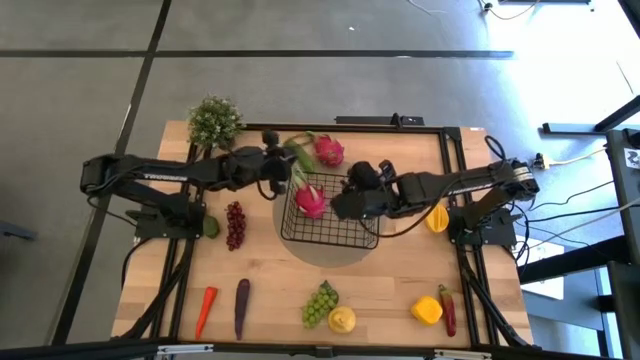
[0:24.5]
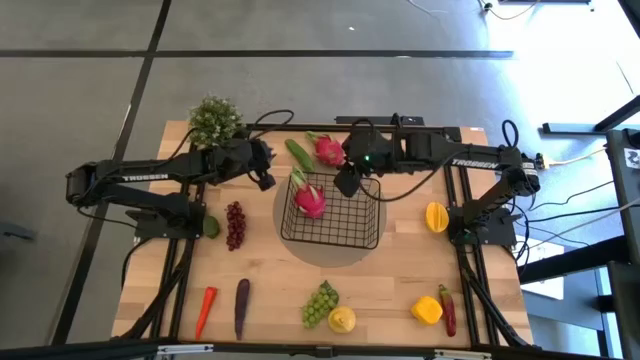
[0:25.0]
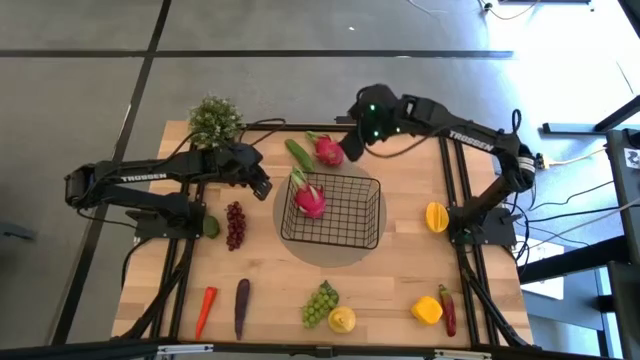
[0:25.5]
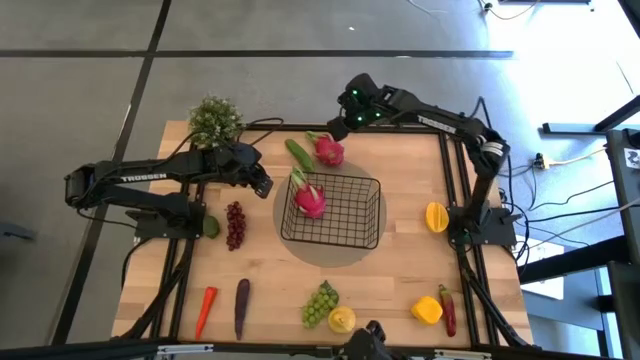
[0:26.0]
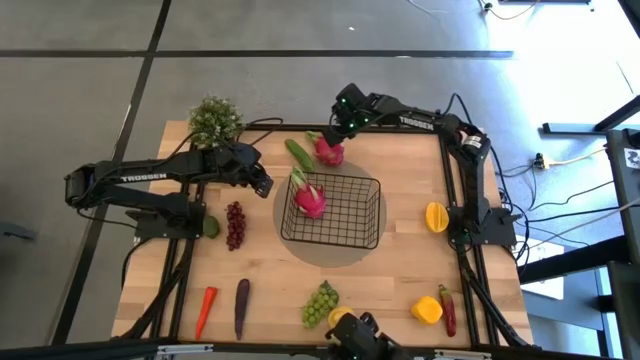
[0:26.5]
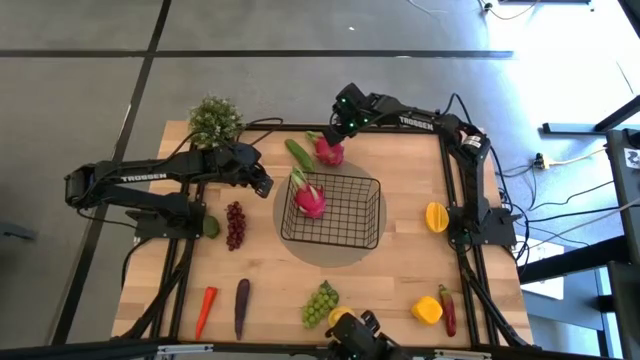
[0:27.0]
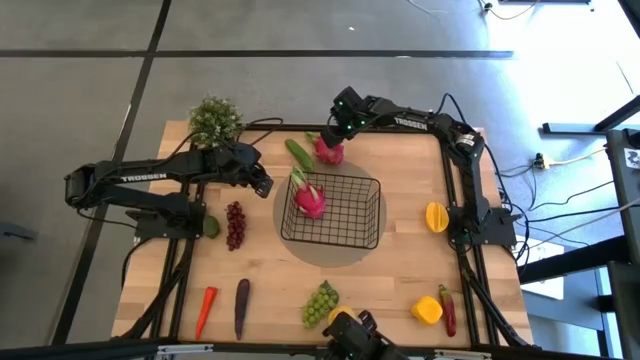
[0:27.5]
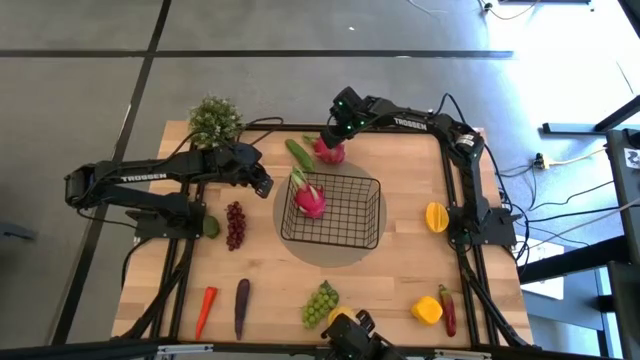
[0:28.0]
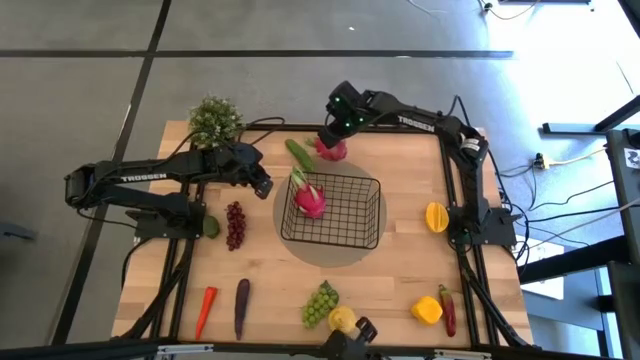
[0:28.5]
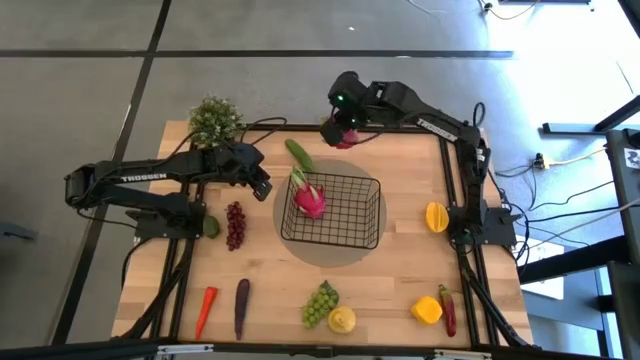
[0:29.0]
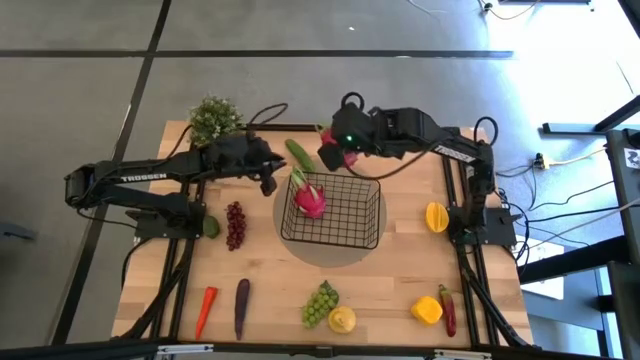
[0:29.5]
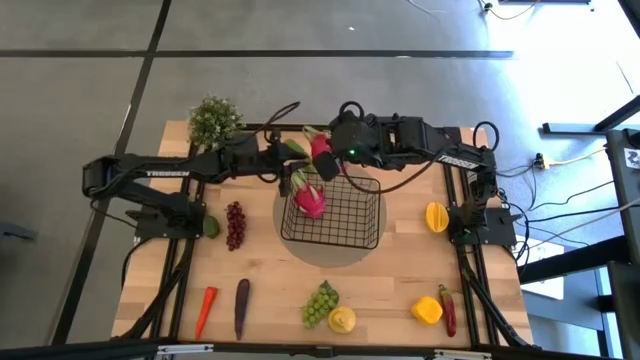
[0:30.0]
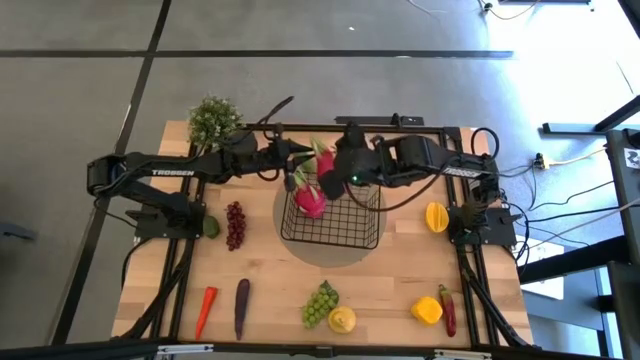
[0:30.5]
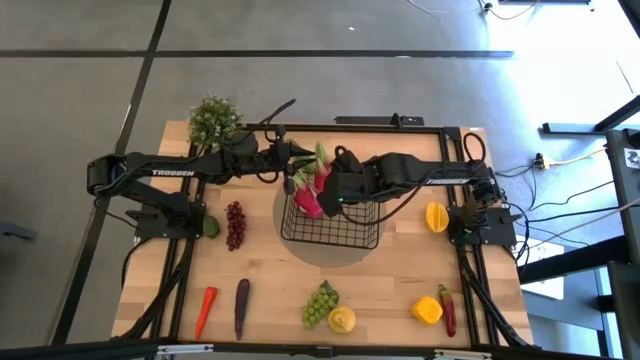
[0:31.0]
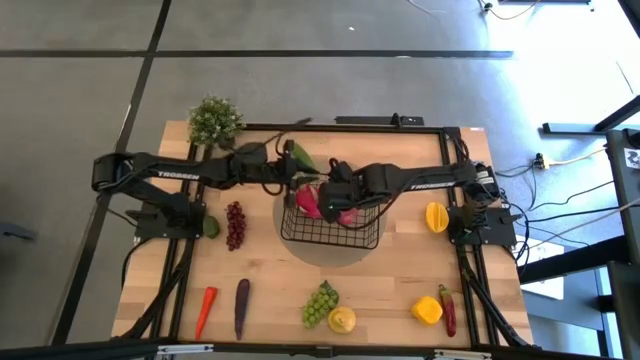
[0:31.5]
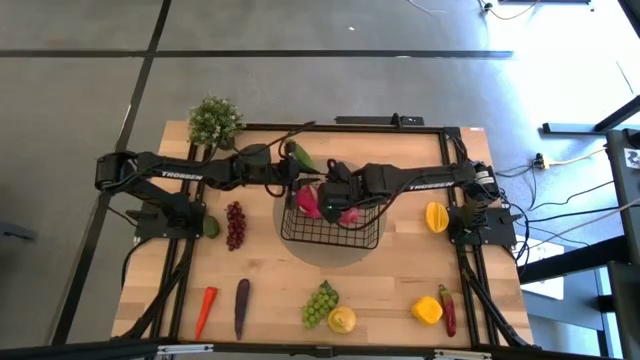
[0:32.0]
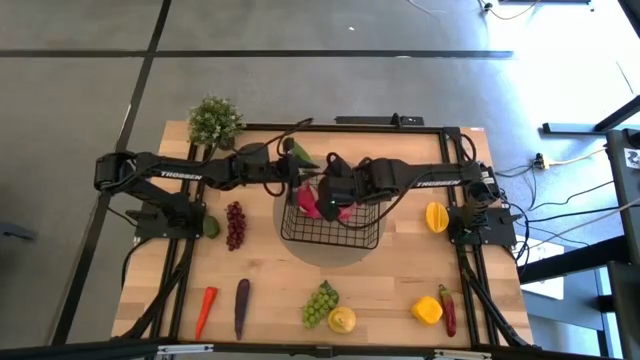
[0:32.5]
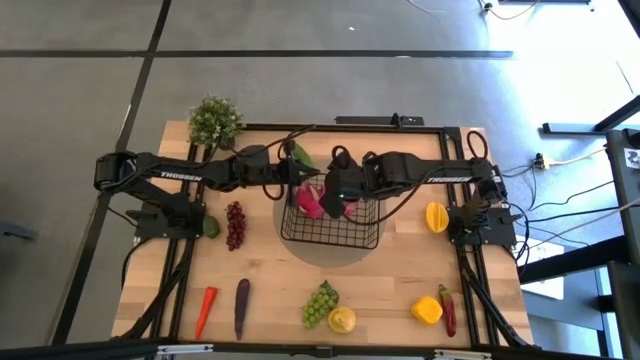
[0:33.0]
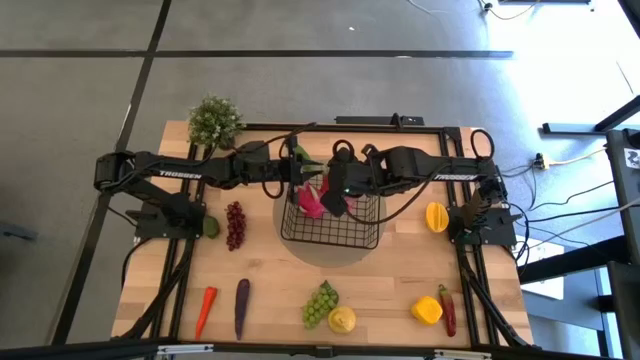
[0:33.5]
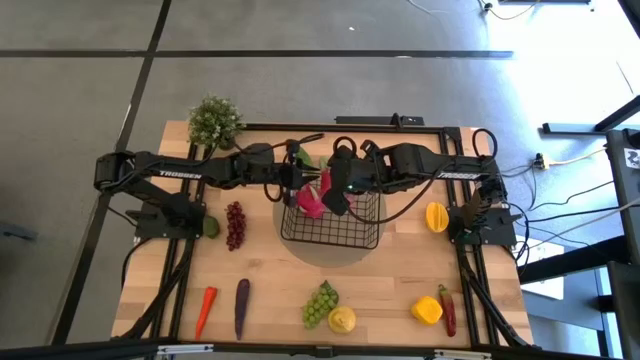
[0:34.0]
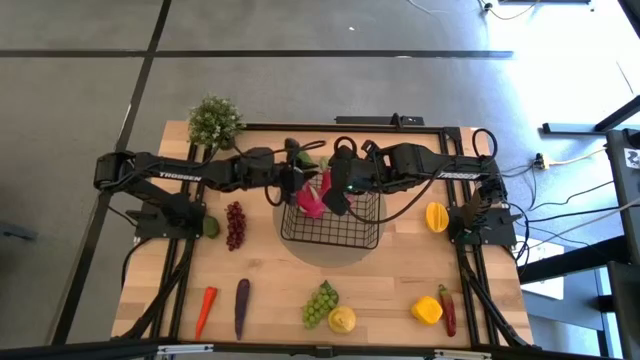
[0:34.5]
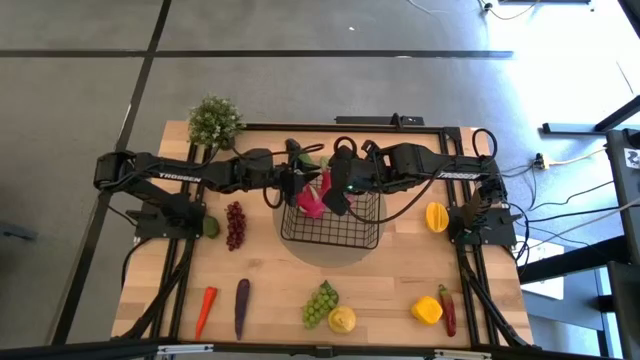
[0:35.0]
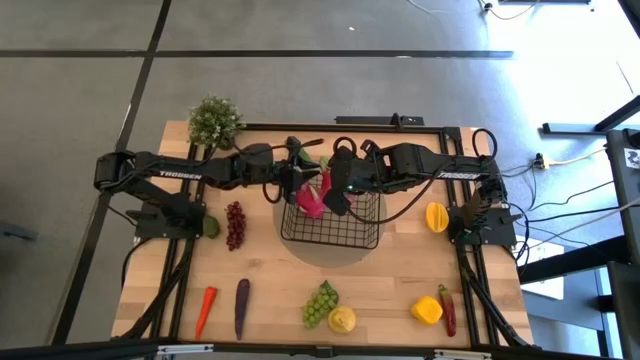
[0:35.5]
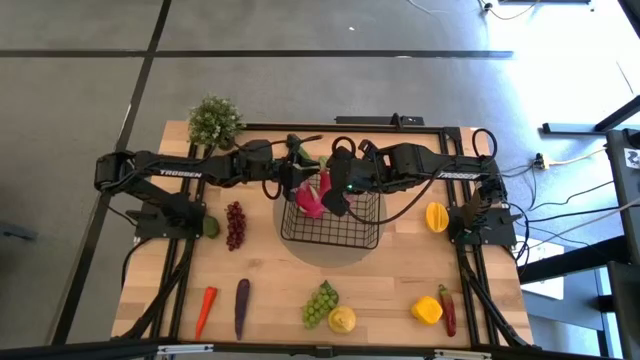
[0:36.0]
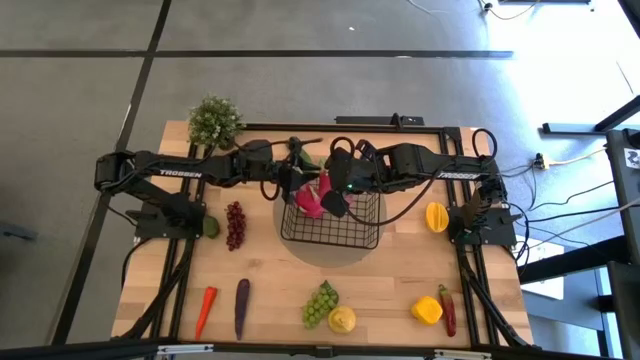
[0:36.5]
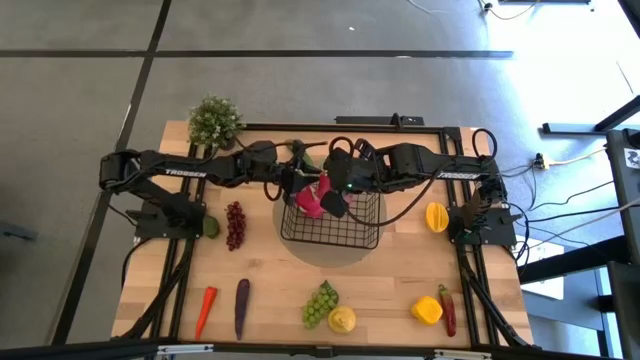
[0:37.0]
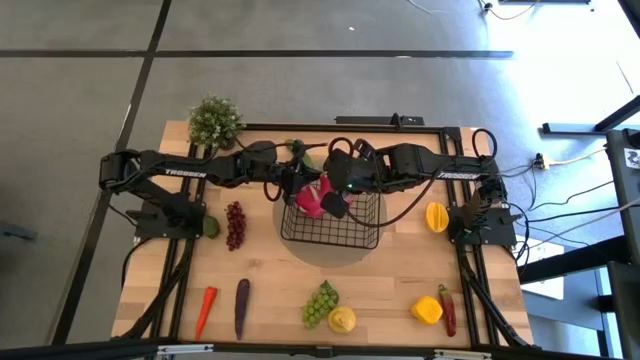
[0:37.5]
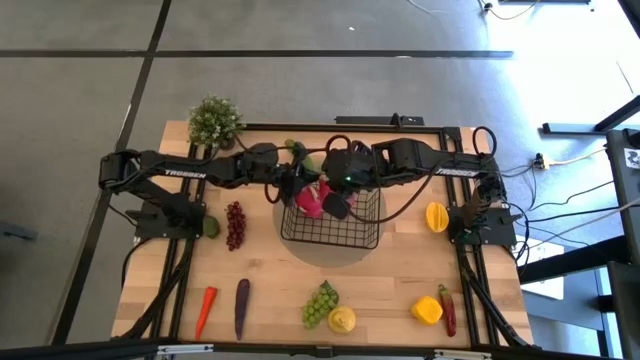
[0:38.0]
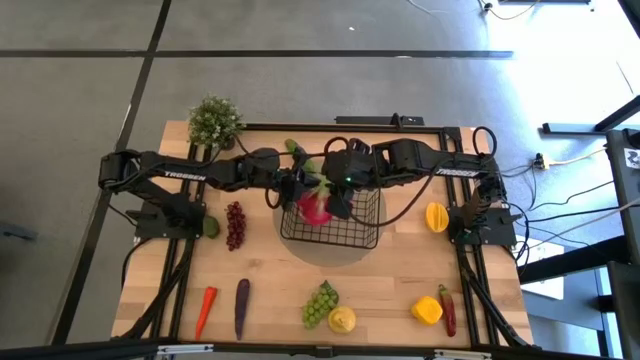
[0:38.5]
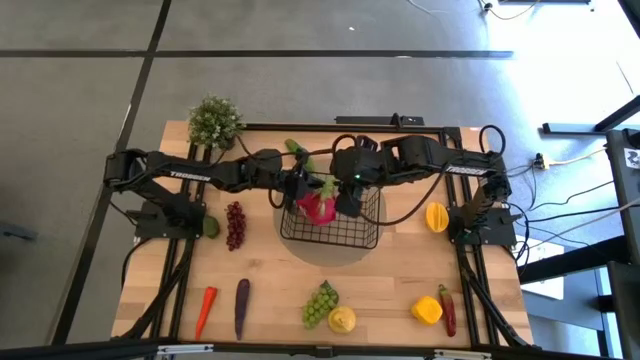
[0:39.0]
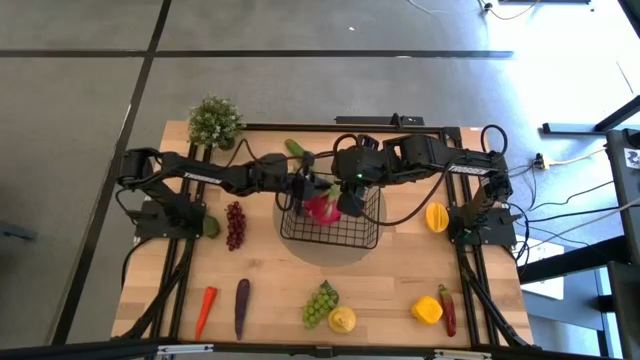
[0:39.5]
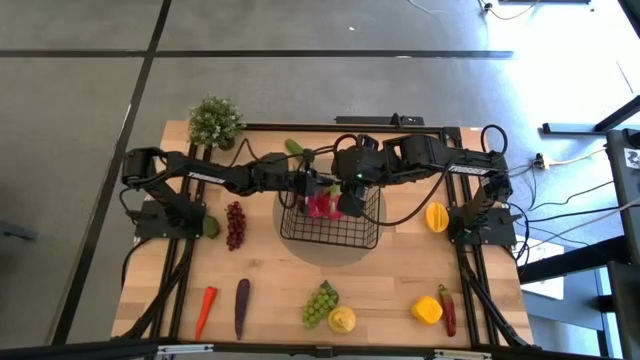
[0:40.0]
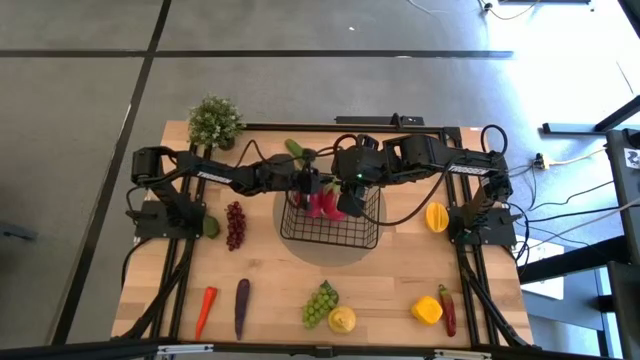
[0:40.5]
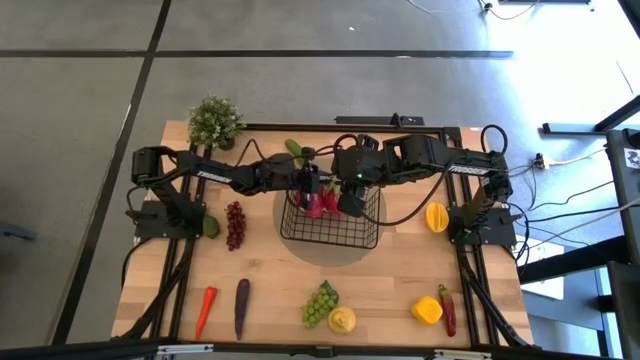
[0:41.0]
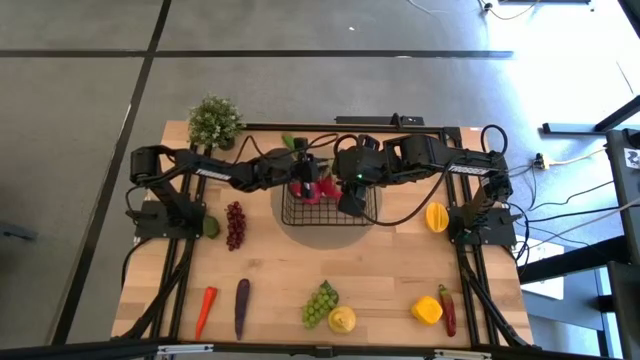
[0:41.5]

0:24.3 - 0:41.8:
Task: Build produce basket
Put the pink dragon fruit into the black wire basket
